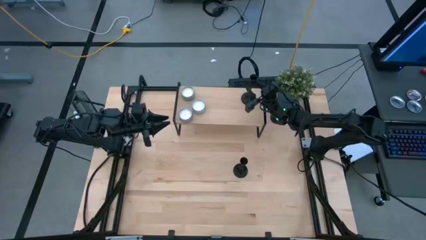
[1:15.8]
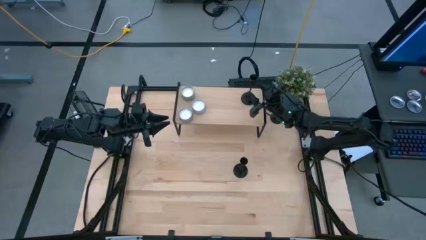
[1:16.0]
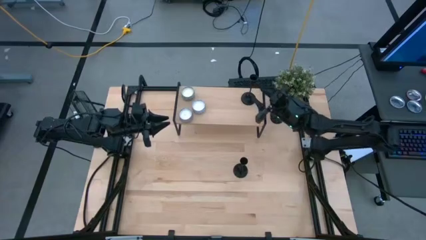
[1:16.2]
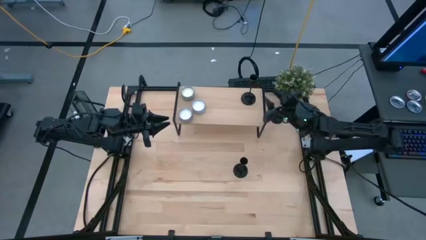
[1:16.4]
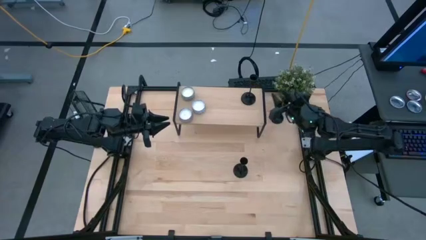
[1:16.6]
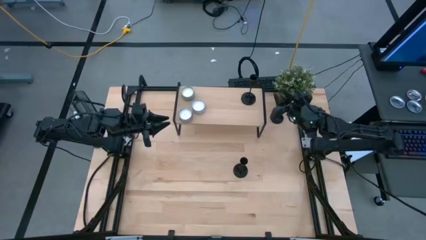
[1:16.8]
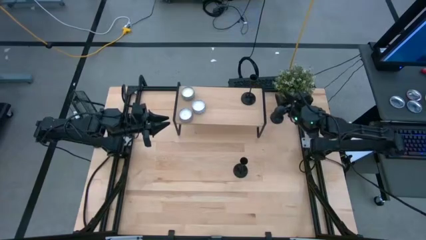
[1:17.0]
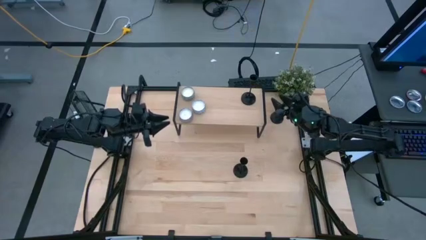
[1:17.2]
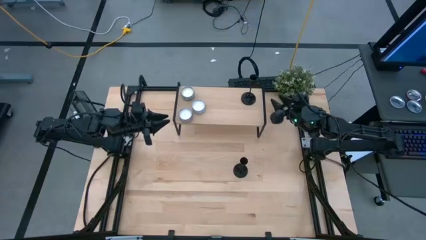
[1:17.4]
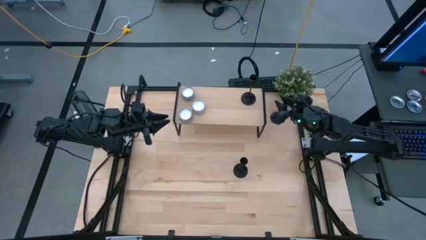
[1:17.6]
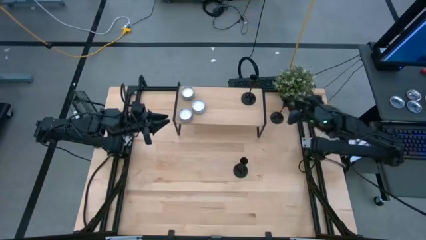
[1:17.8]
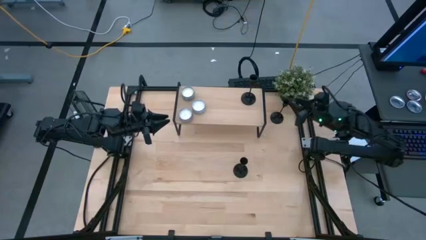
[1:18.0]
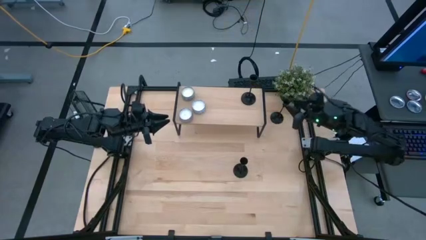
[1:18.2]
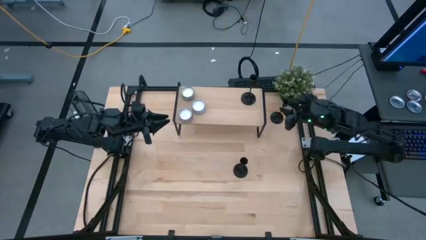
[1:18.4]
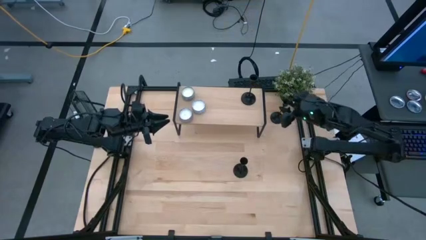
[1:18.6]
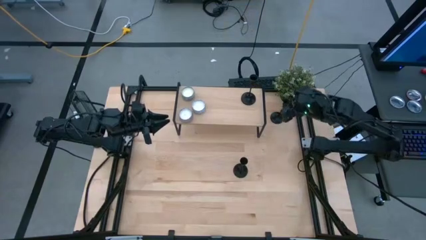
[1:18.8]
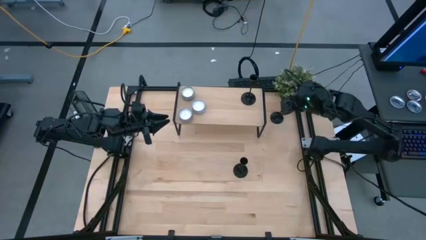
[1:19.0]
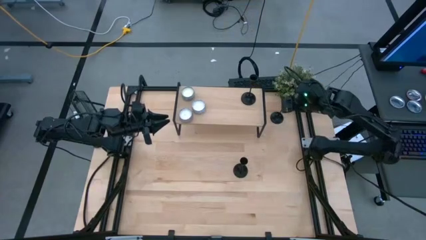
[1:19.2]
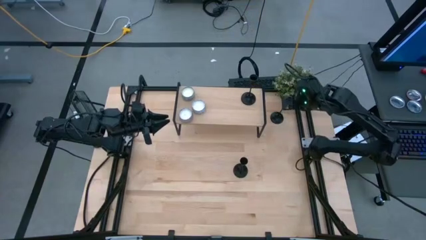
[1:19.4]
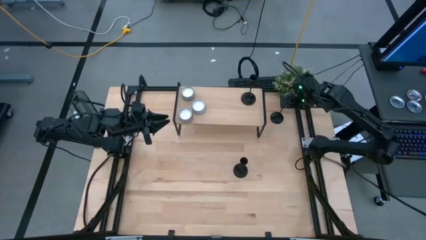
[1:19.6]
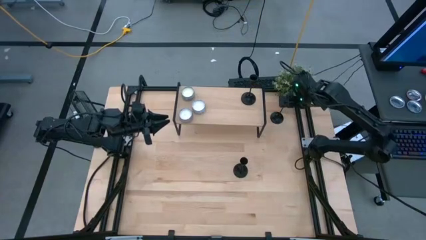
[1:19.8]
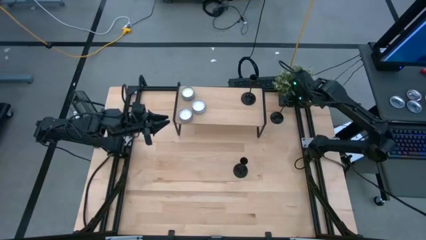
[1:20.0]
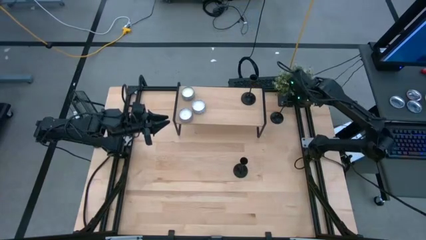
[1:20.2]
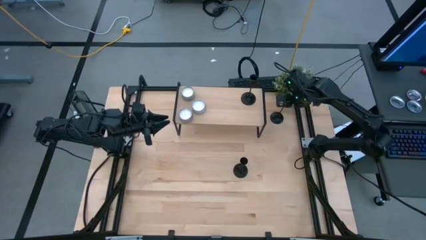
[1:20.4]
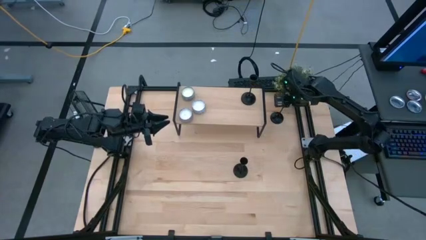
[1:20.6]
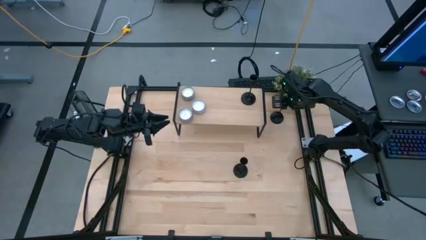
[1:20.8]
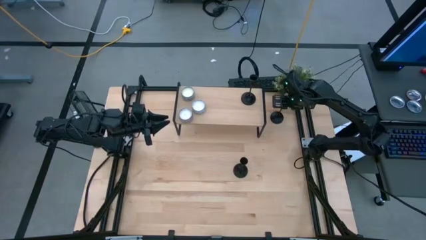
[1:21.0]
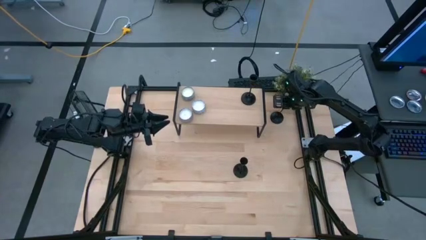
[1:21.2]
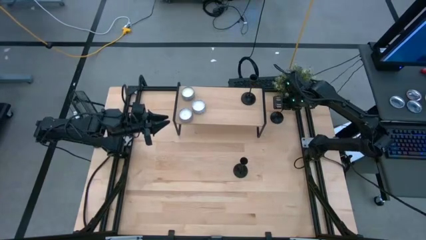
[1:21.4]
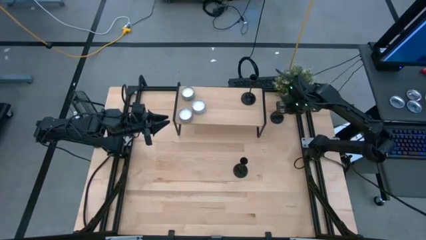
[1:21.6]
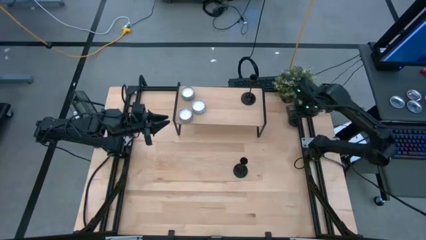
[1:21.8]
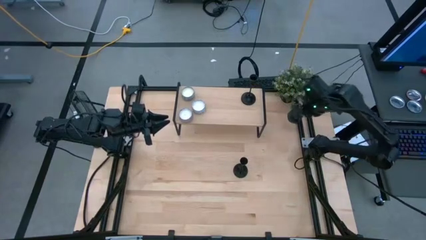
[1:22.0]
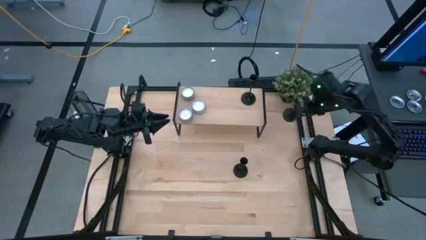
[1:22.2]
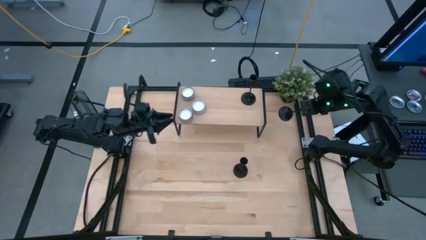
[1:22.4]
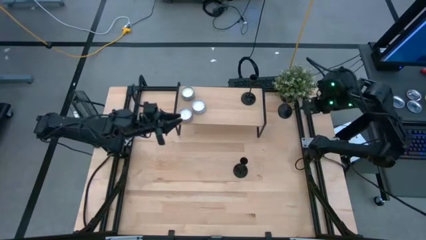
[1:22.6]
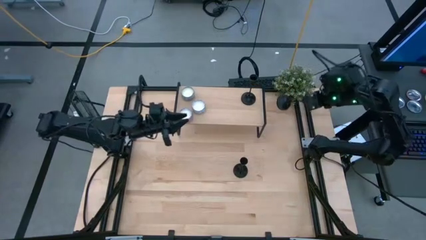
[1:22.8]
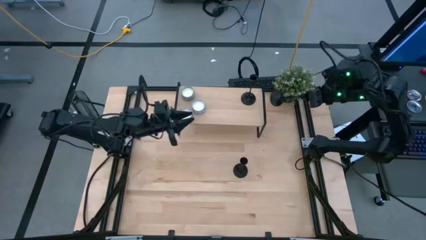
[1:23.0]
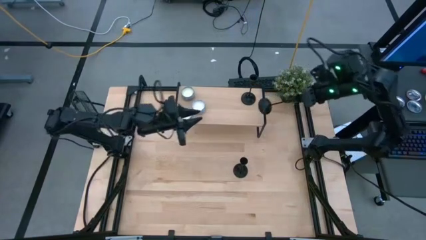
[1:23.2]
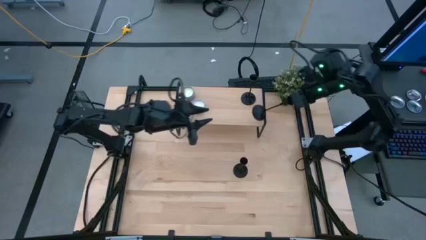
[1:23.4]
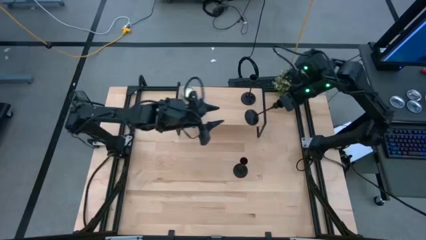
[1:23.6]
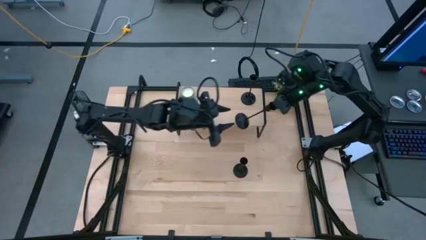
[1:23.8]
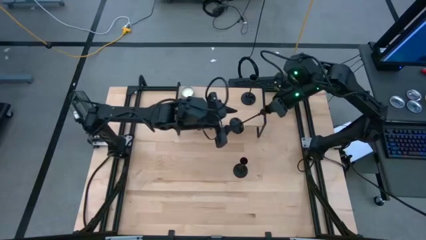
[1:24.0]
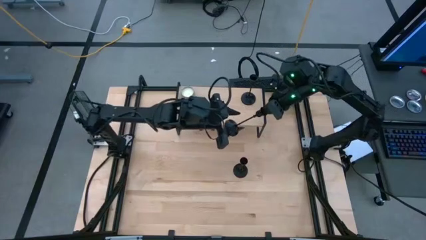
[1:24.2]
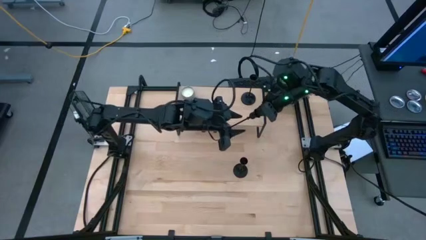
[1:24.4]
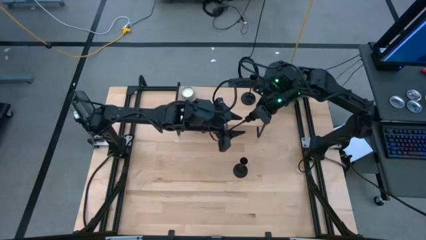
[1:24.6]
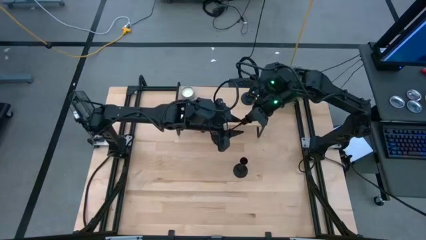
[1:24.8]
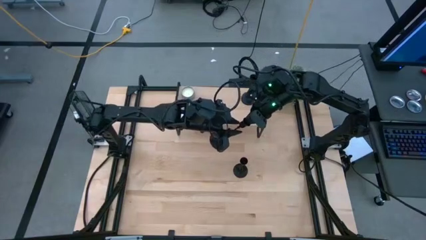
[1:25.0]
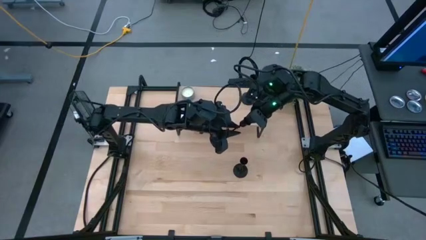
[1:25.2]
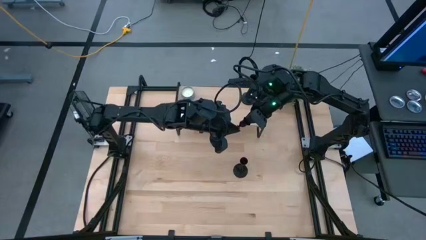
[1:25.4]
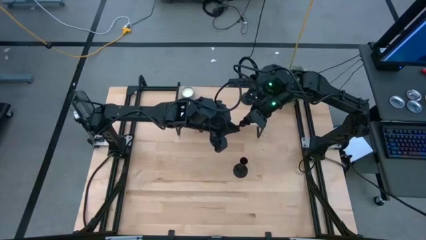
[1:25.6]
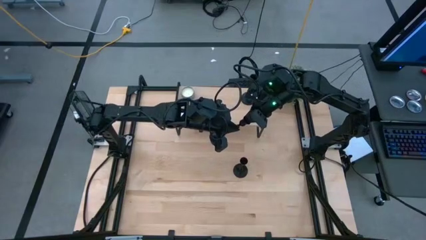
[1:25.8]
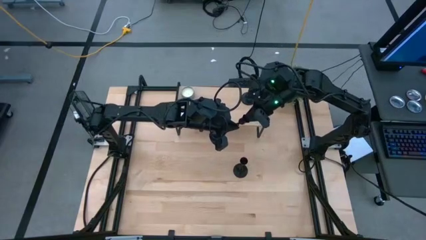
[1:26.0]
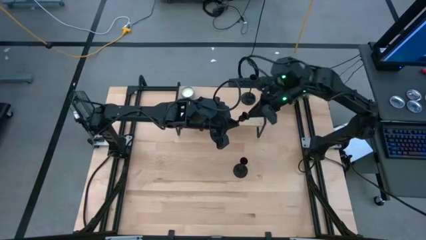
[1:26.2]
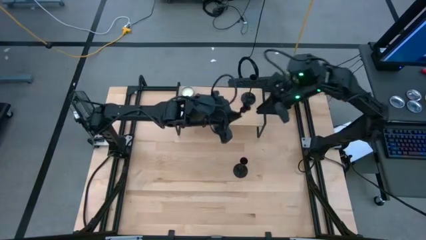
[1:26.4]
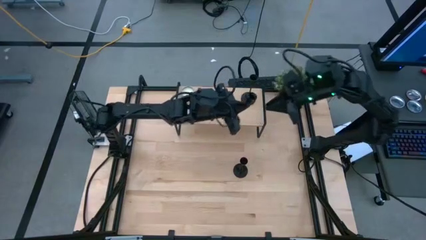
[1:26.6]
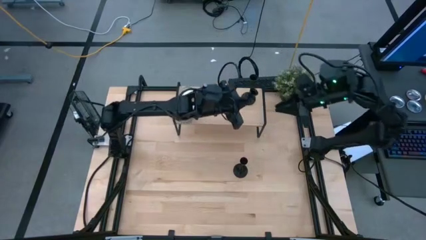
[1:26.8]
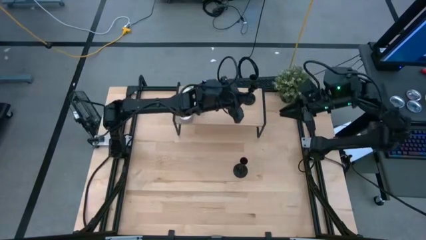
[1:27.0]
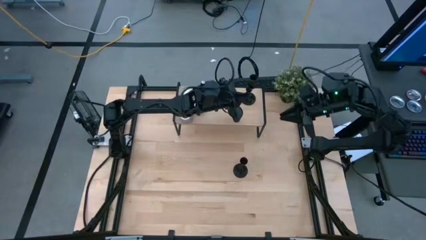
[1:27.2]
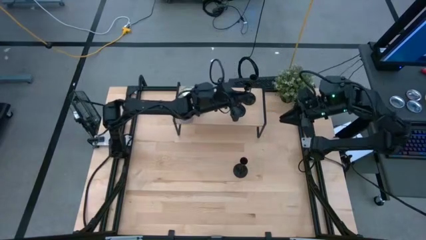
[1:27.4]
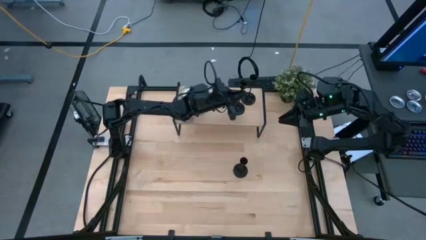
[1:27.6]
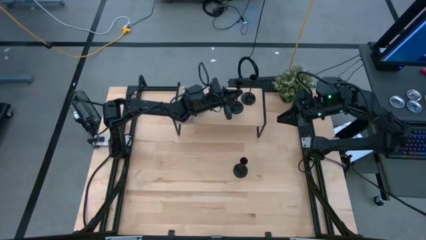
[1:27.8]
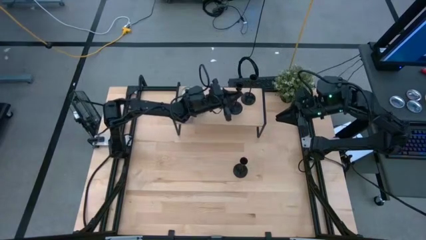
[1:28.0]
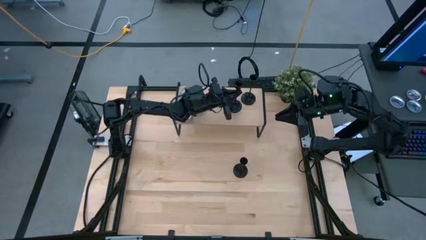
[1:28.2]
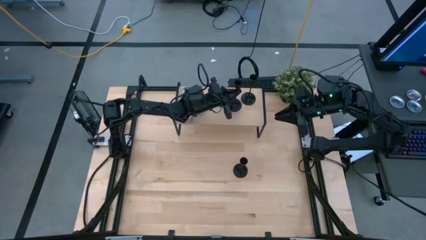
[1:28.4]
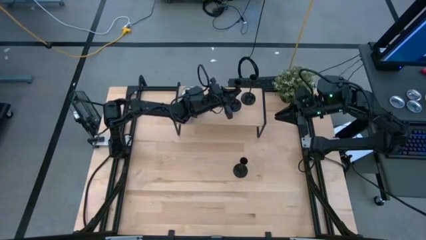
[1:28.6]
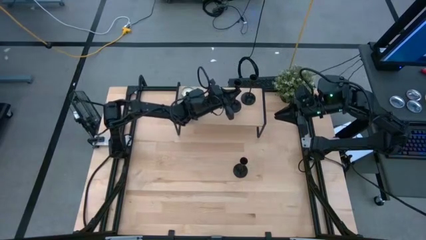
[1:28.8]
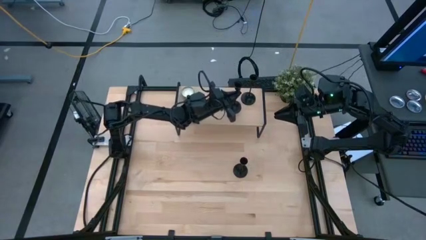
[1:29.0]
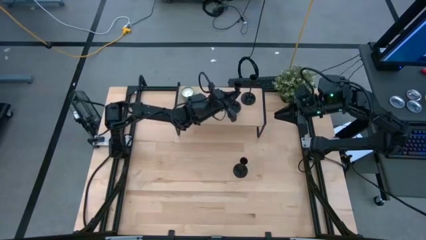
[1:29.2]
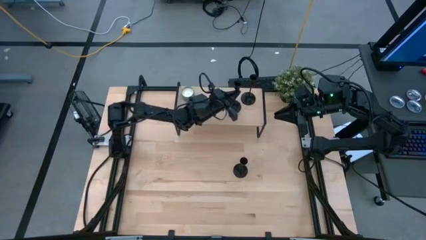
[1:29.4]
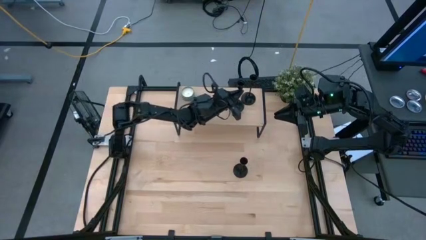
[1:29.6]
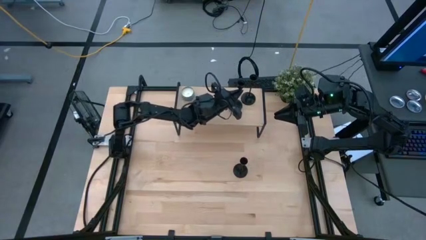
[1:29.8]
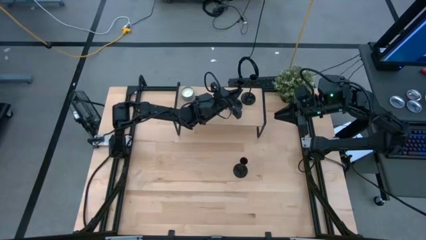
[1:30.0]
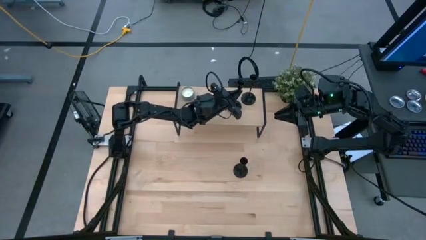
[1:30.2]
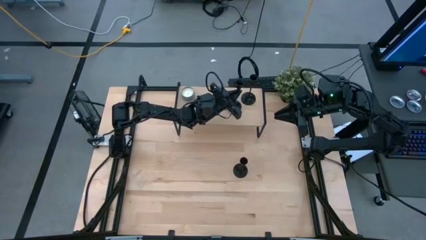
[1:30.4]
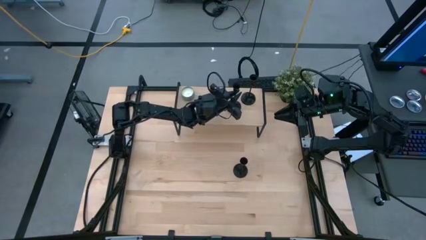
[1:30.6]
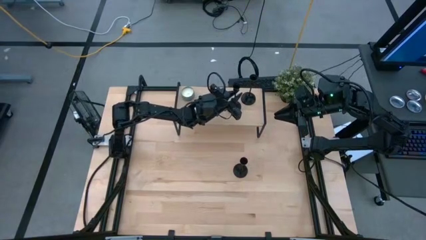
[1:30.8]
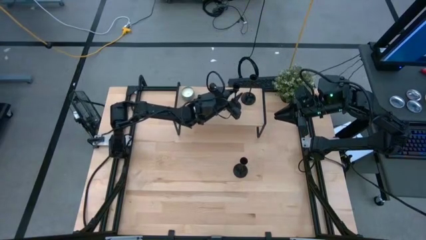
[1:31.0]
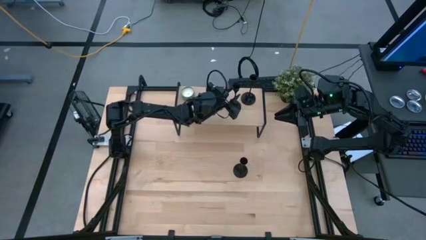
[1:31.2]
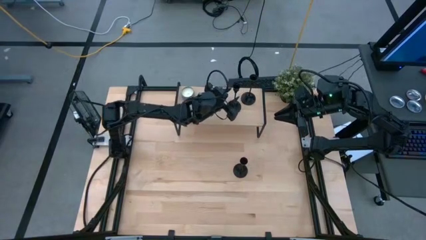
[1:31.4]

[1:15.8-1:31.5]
Task: Pick & Place candle stick holders
Put the top candle holder on the shelf

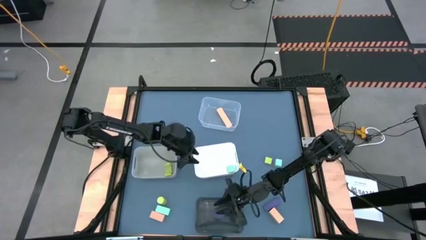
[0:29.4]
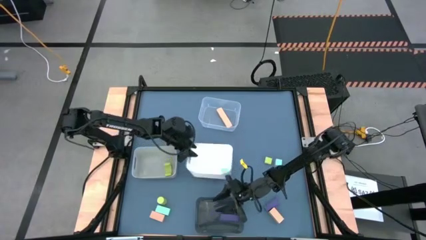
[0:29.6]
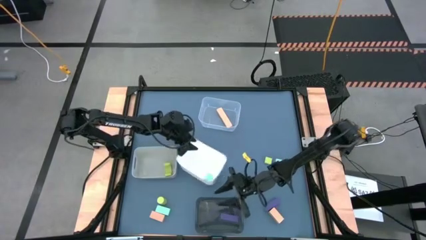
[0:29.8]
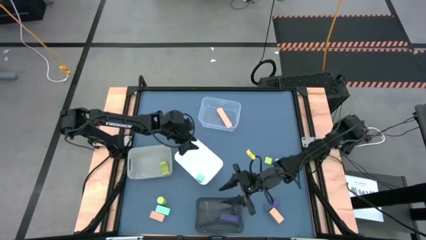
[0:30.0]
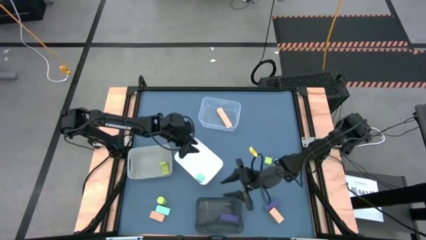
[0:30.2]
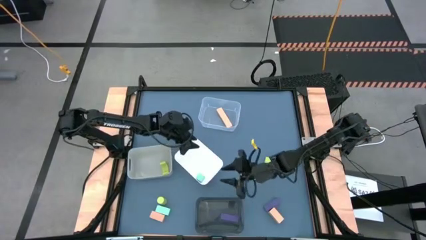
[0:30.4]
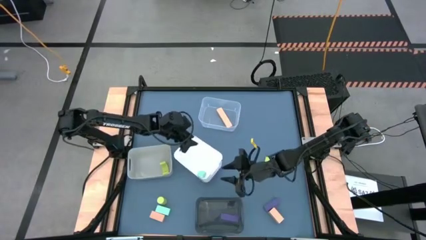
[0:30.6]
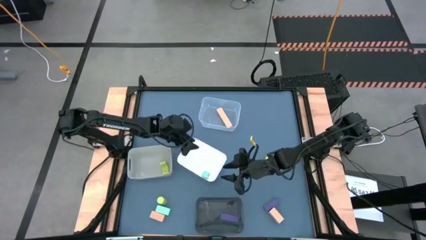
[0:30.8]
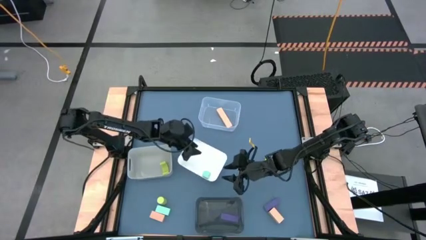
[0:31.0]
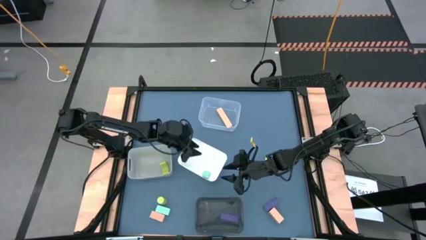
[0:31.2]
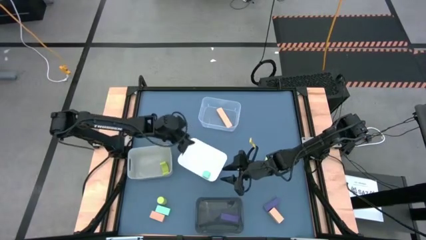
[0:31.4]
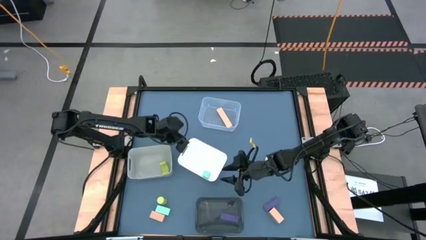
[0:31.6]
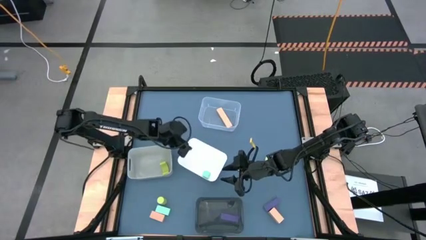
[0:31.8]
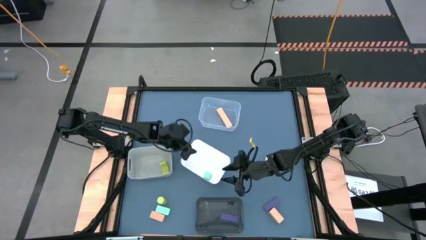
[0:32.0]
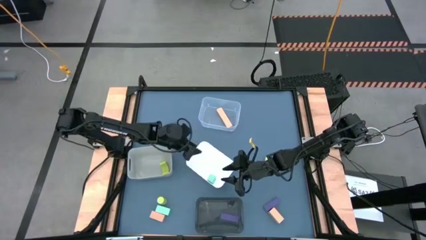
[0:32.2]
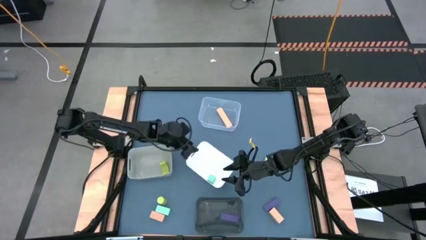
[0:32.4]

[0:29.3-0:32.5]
Task: Sort & place blocks by color
Adjust the white bin
